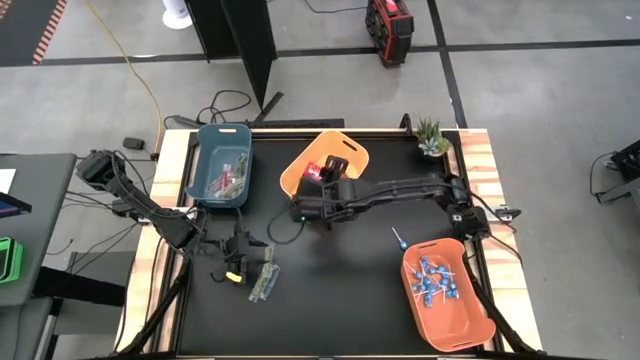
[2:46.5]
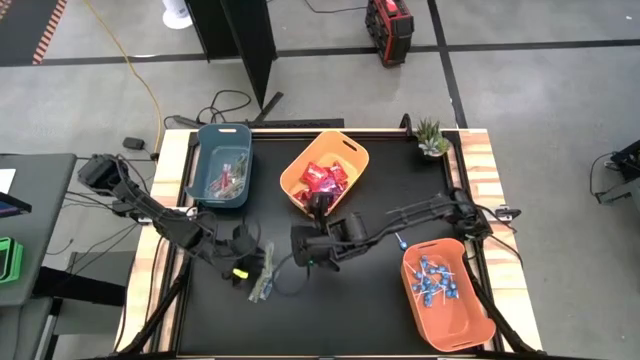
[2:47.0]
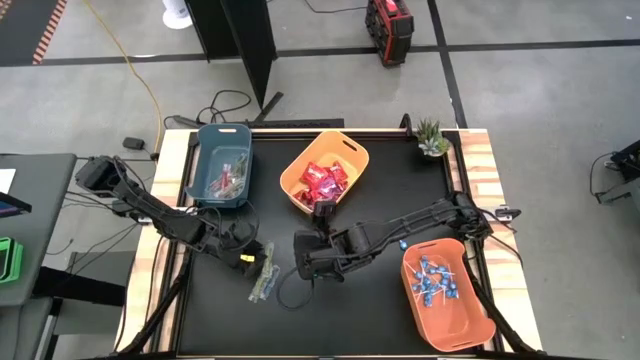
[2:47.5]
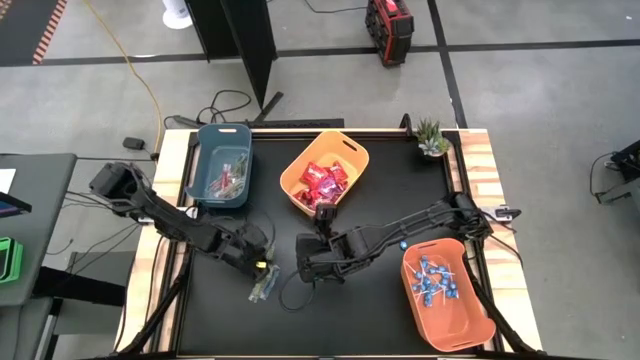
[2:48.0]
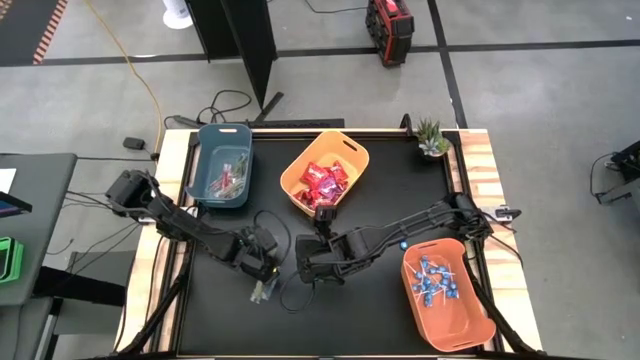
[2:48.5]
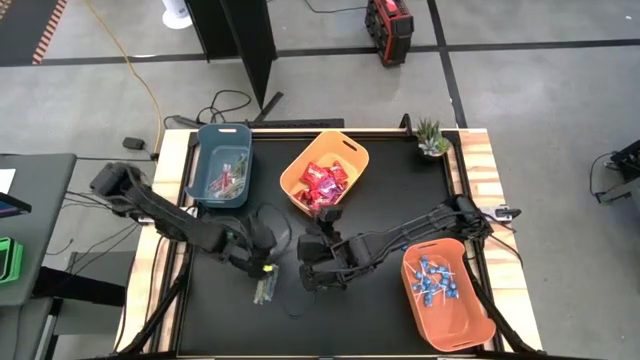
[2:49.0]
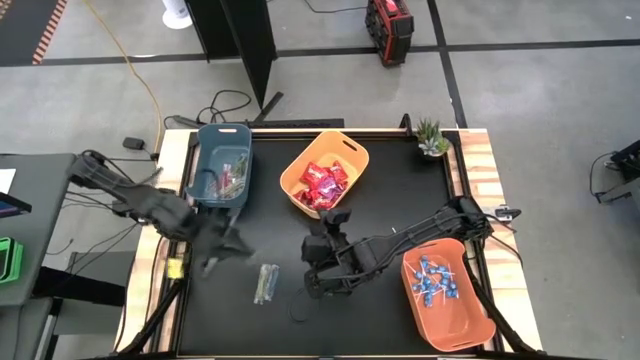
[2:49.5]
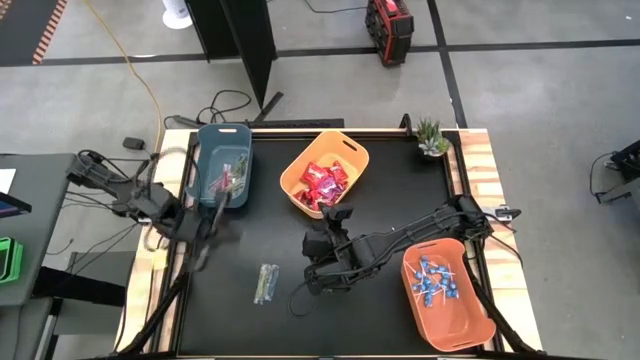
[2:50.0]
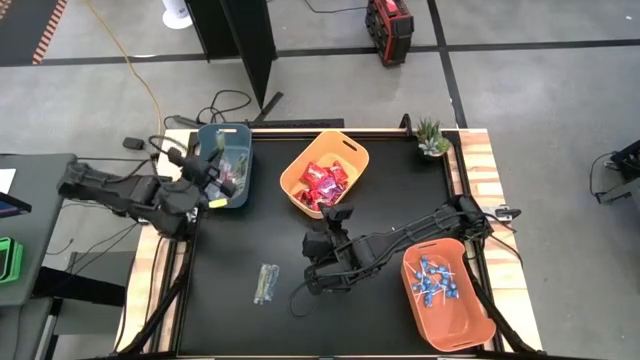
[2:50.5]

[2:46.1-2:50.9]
Task: Sort candy
Put the green gummy into the blue bin

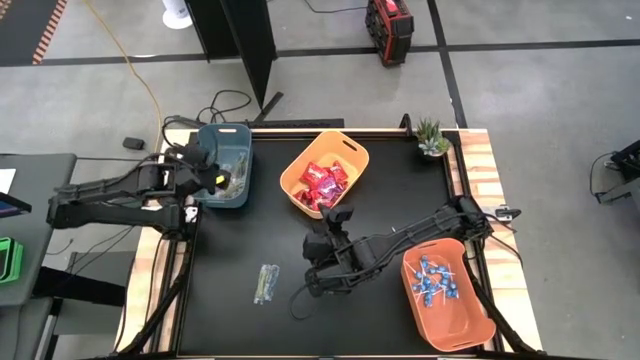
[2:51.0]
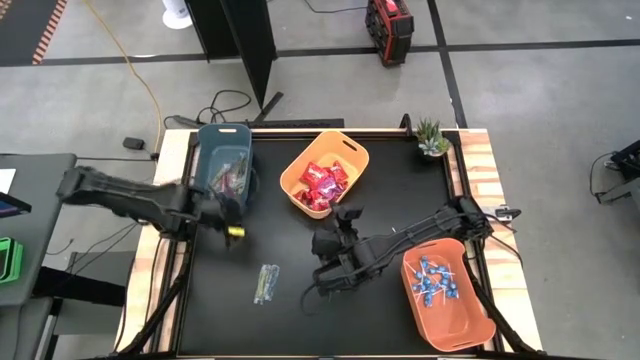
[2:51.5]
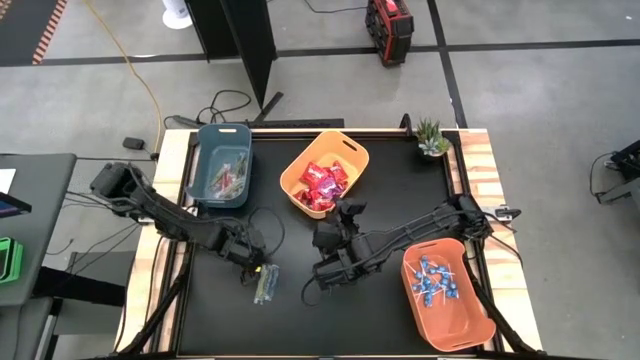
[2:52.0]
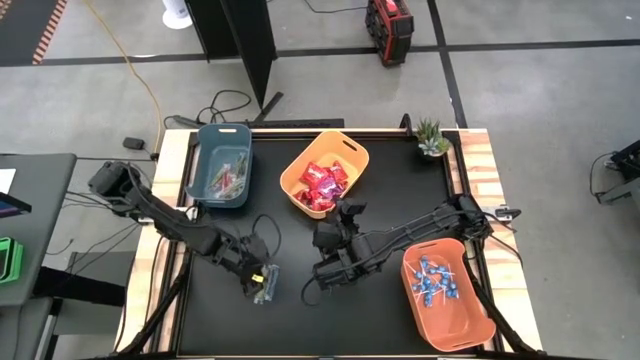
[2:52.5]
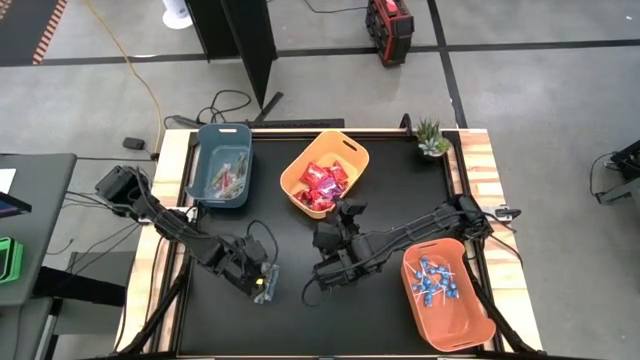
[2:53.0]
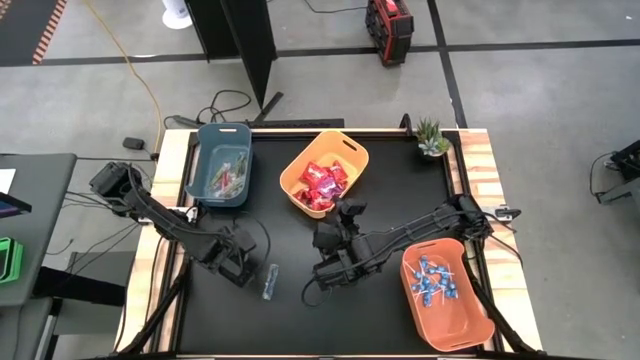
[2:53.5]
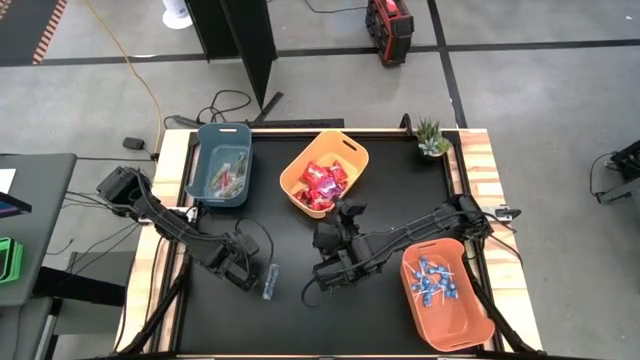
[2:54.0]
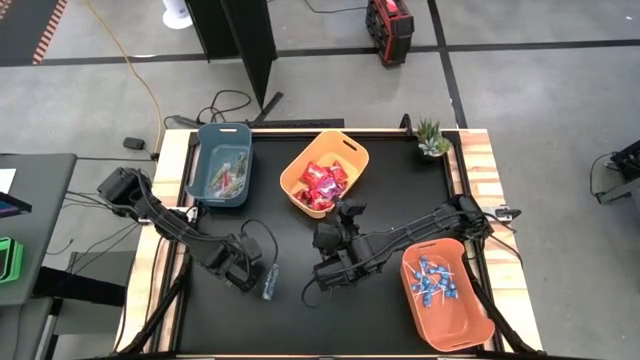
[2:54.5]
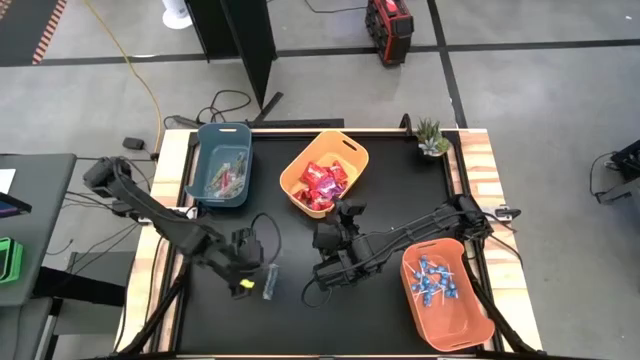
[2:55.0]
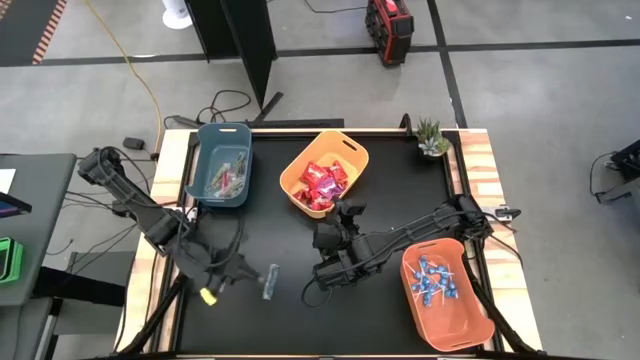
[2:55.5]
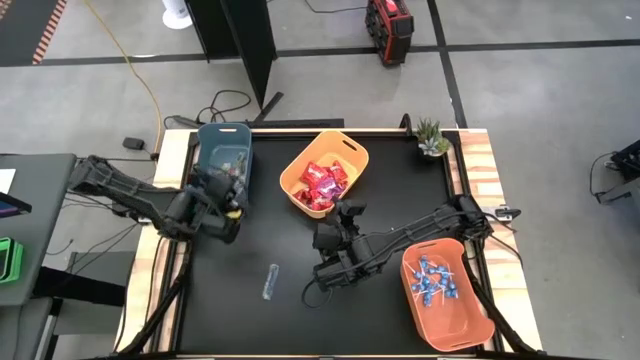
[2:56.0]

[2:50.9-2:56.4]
Put the green gummy into the blue bin

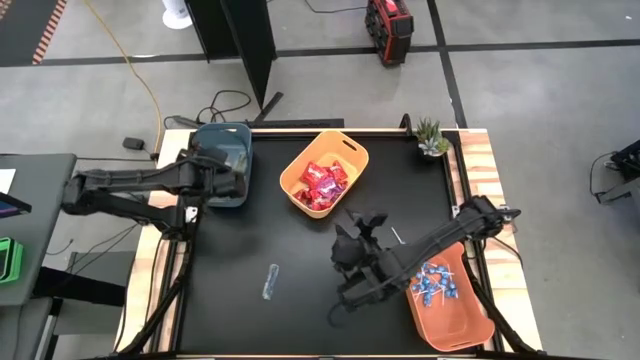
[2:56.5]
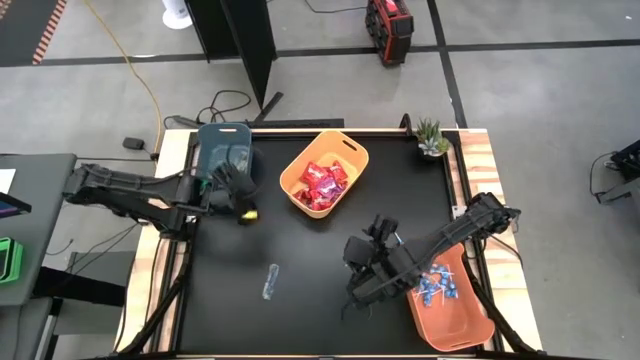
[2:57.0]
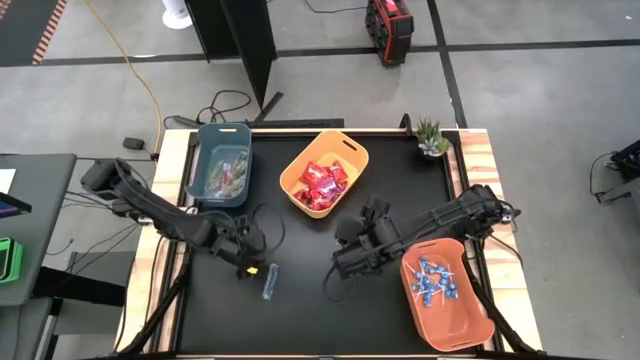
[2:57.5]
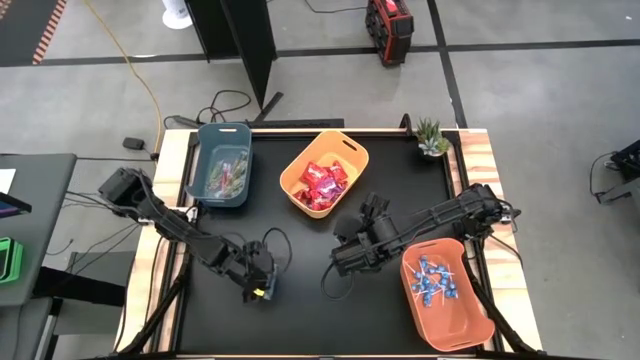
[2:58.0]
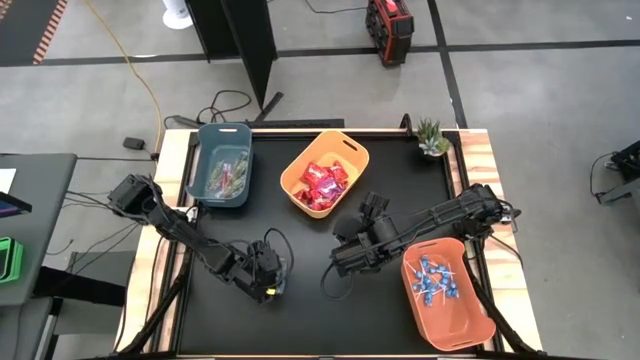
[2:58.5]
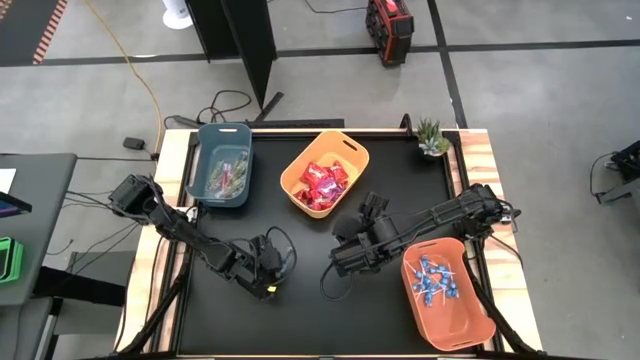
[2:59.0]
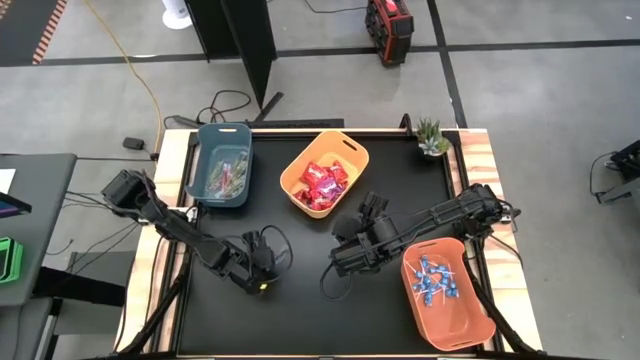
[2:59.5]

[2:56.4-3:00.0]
Put the blue gummy into the blue bin

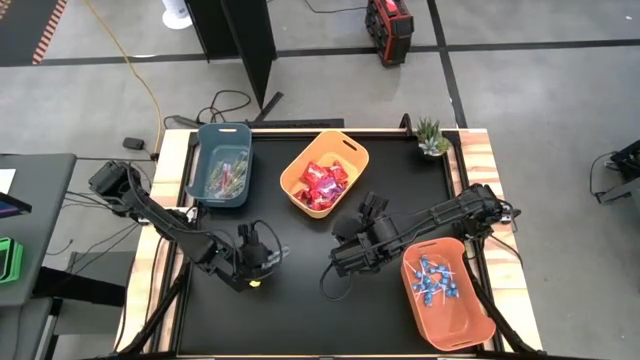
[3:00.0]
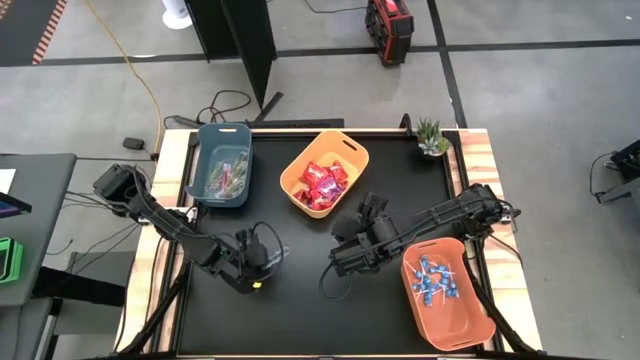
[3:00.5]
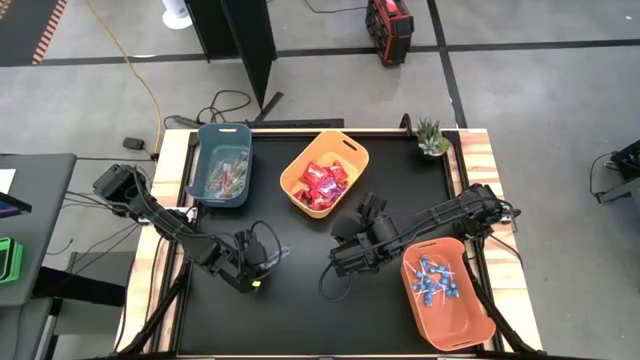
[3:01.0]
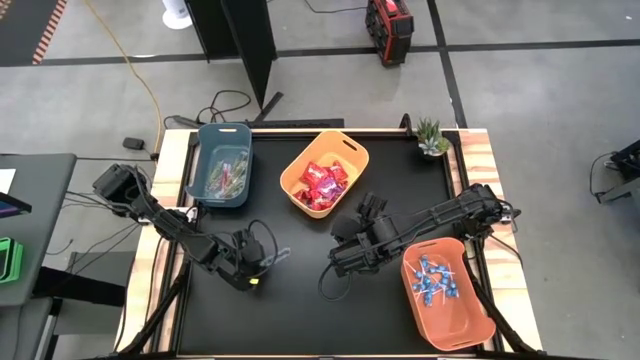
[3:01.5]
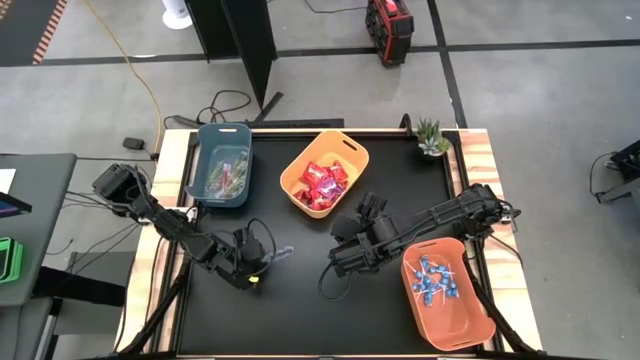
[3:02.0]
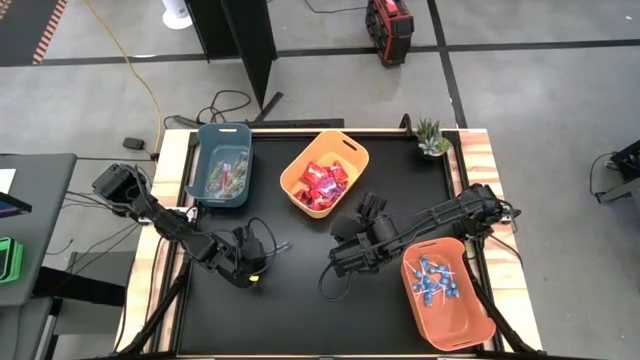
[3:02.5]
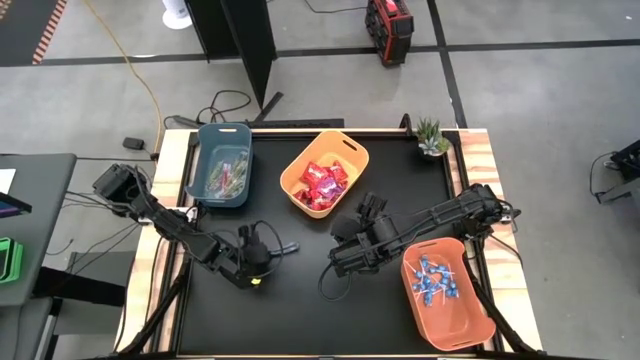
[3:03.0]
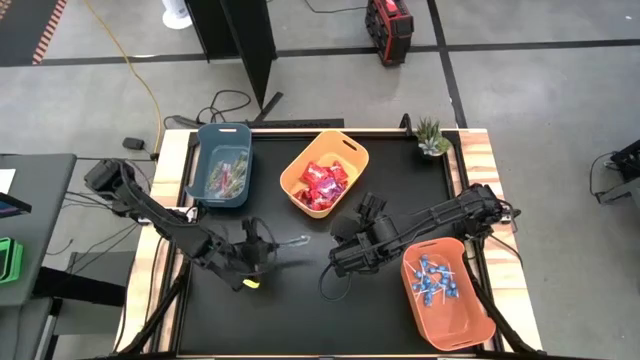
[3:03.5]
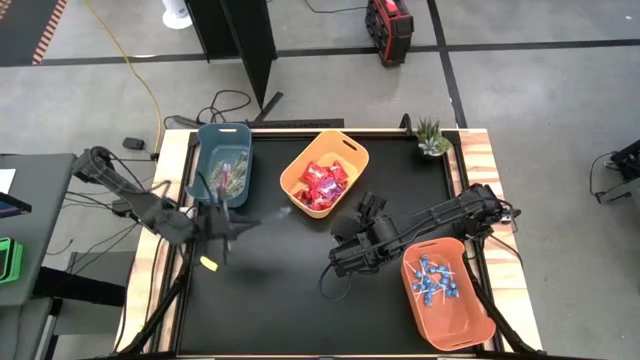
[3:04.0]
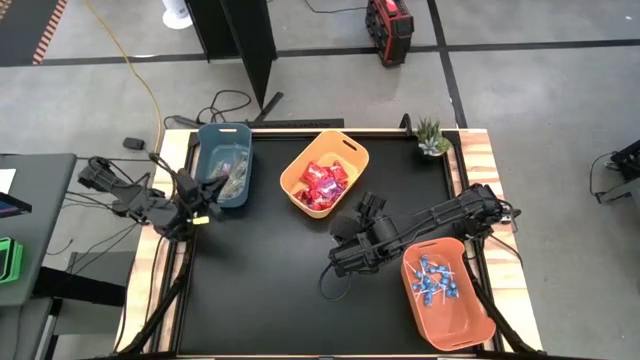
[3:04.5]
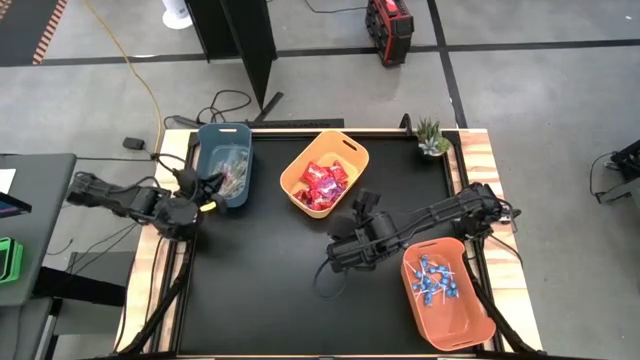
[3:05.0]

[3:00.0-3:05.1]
Put the blue gummy into the blue bin

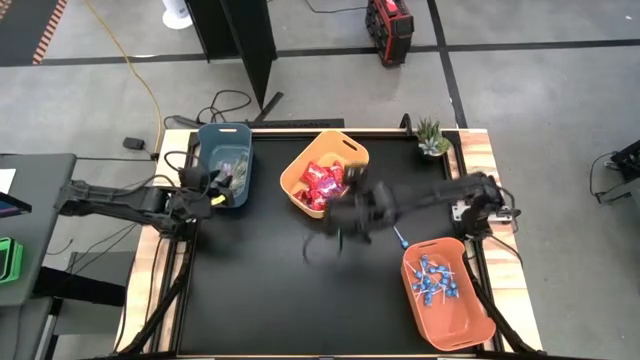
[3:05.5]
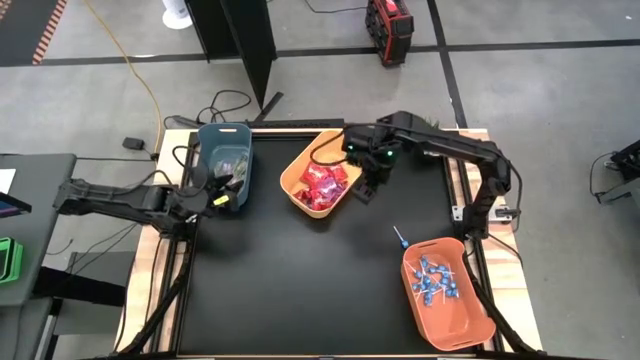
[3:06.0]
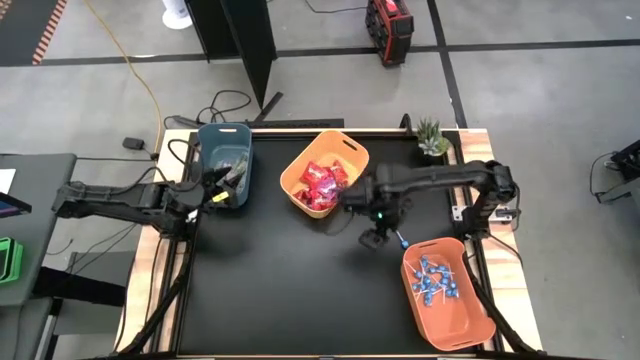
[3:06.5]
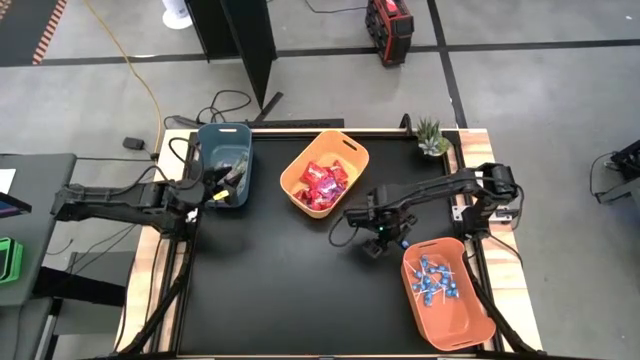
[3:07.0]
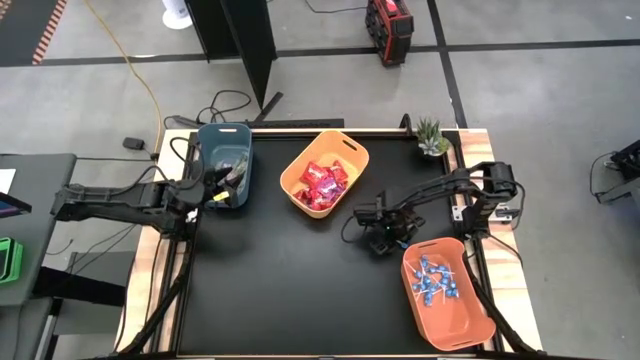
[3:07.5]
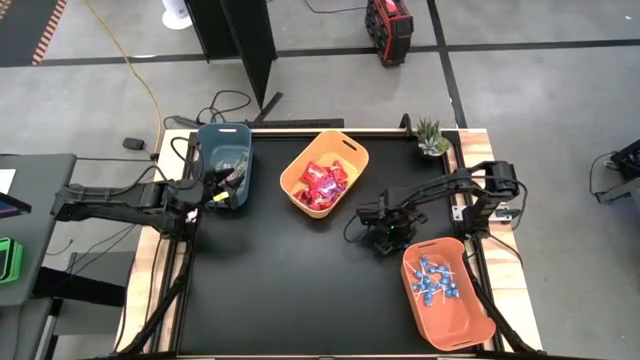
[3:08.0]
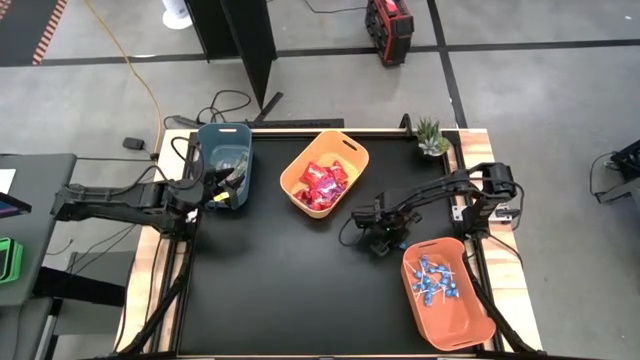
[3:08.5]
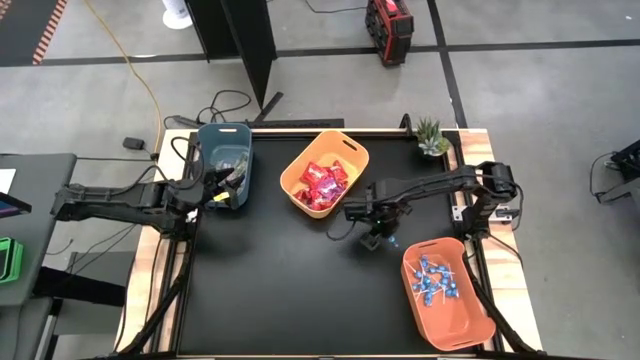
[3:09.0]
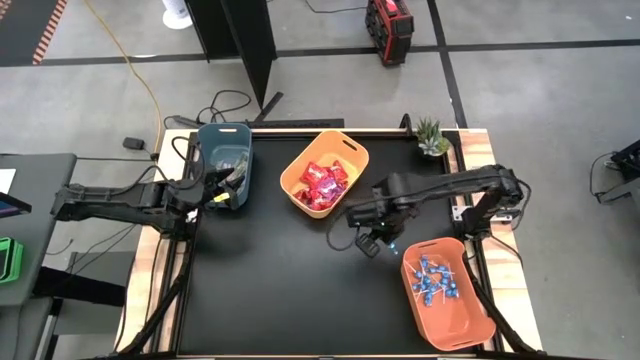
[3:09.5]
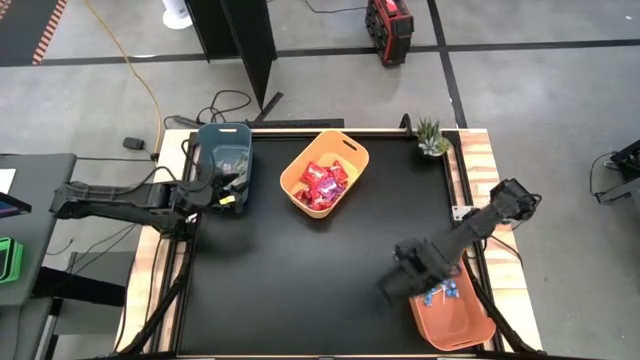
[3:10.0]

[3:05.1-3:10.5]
Put the blue lollipop into the orange bin
